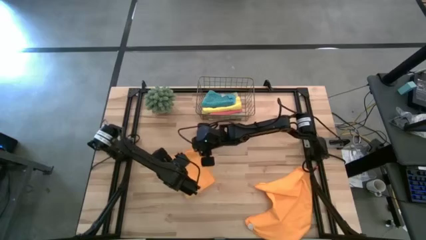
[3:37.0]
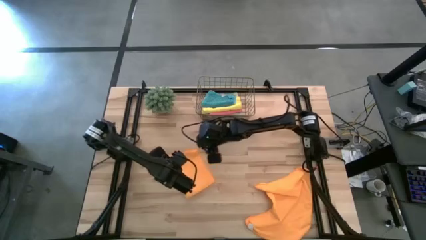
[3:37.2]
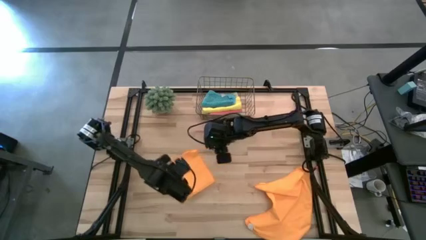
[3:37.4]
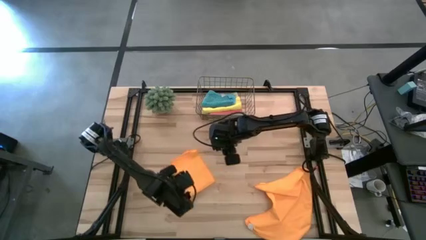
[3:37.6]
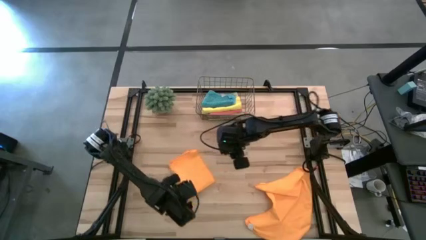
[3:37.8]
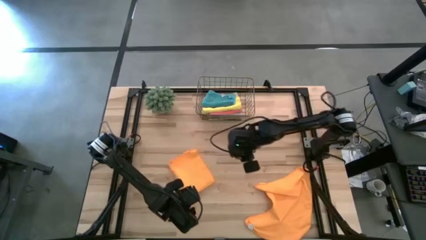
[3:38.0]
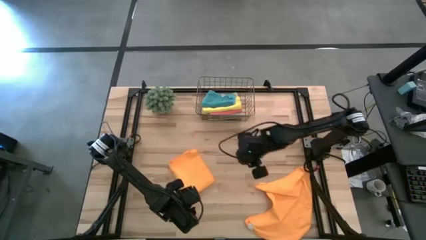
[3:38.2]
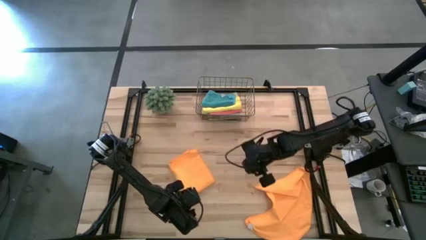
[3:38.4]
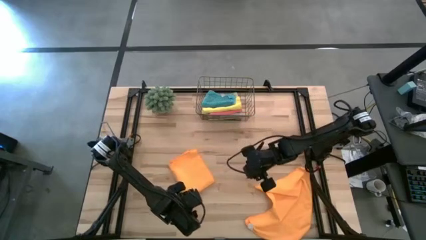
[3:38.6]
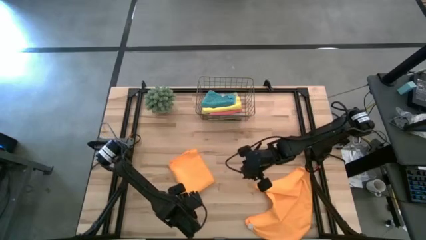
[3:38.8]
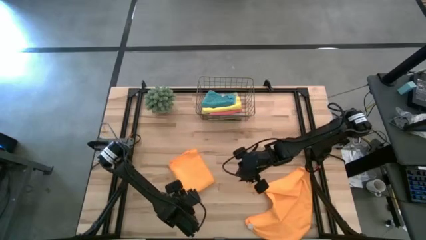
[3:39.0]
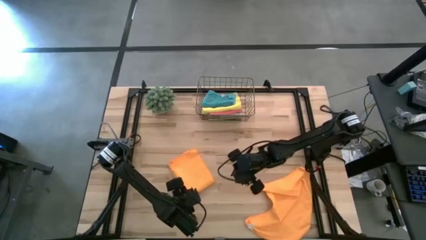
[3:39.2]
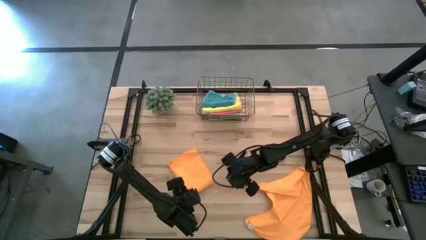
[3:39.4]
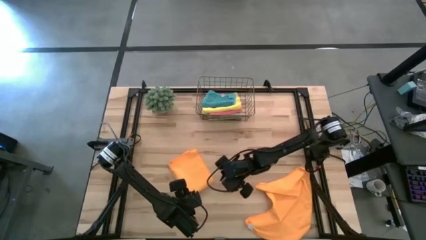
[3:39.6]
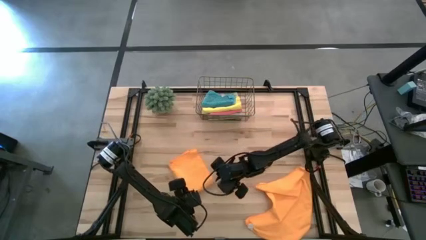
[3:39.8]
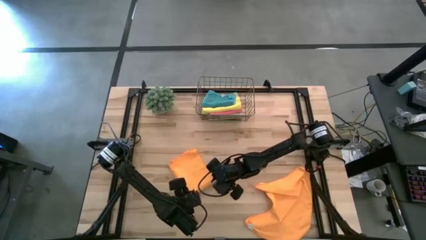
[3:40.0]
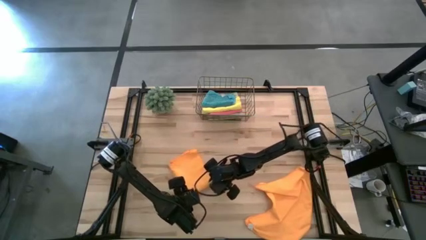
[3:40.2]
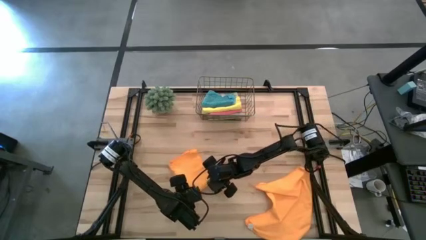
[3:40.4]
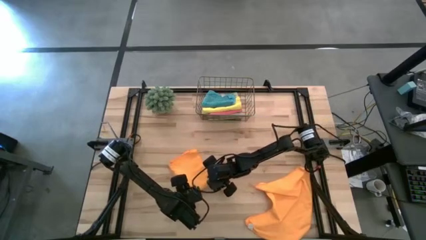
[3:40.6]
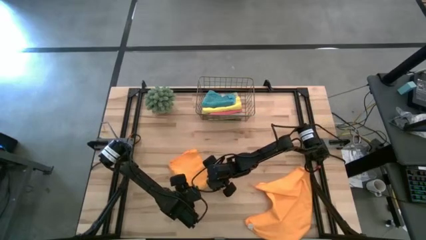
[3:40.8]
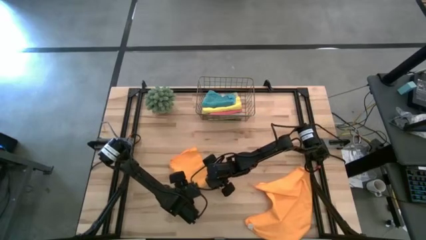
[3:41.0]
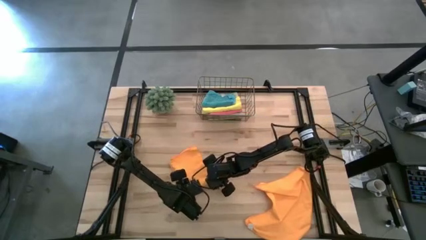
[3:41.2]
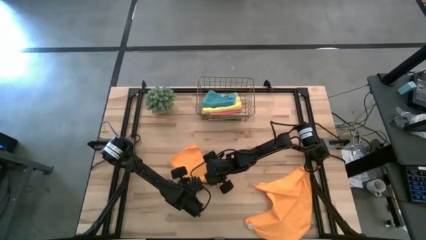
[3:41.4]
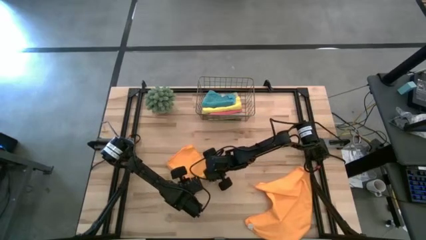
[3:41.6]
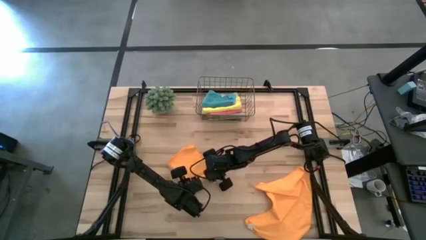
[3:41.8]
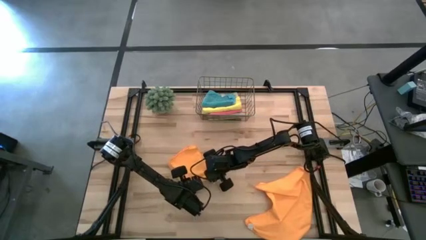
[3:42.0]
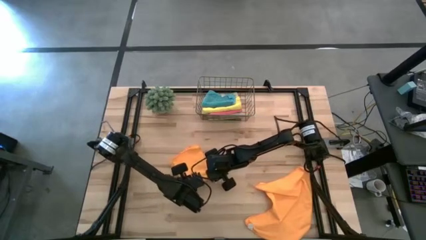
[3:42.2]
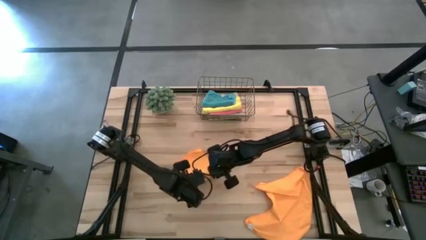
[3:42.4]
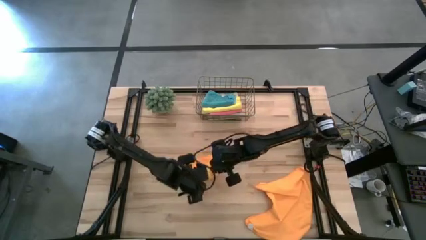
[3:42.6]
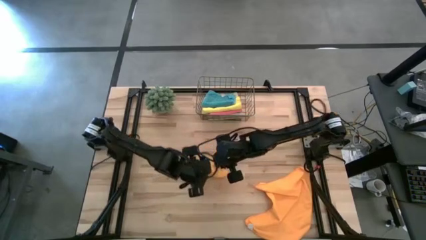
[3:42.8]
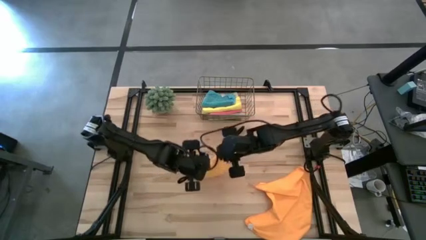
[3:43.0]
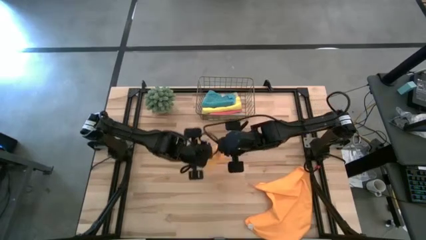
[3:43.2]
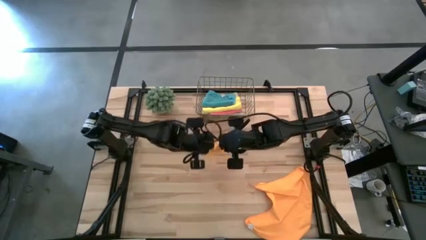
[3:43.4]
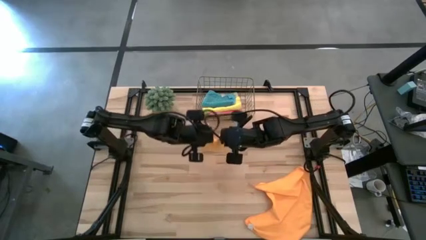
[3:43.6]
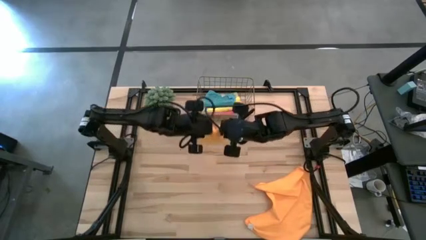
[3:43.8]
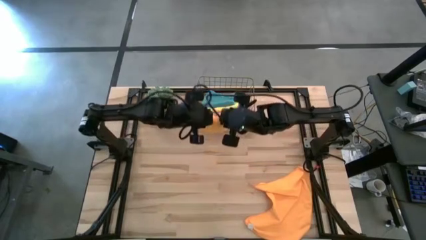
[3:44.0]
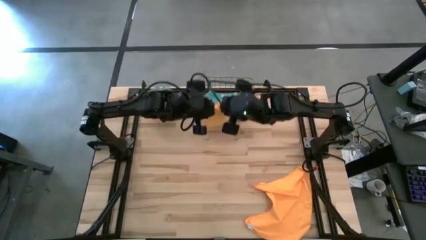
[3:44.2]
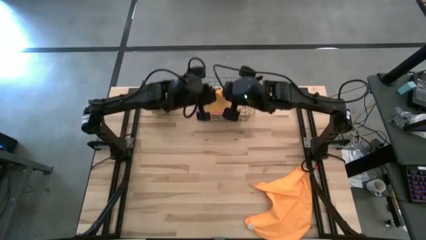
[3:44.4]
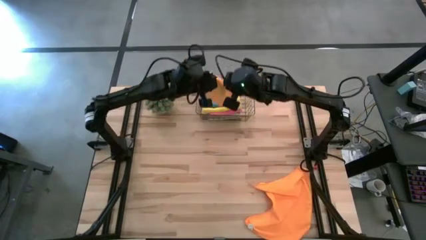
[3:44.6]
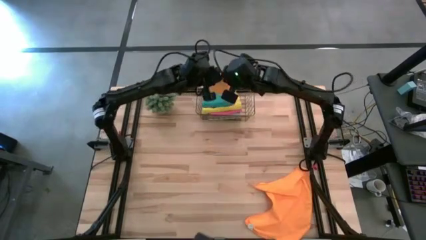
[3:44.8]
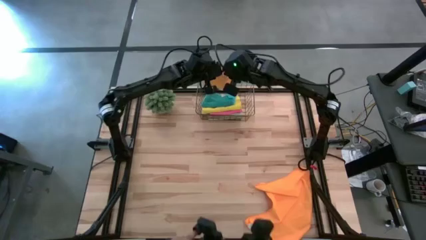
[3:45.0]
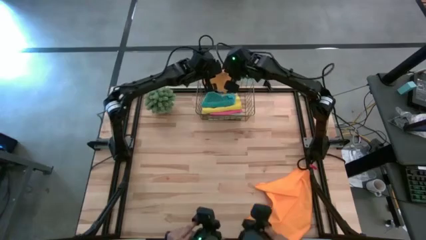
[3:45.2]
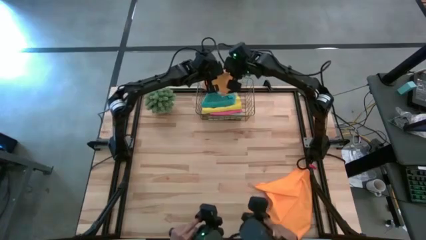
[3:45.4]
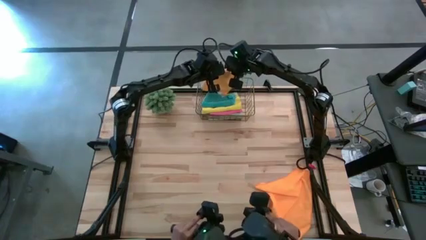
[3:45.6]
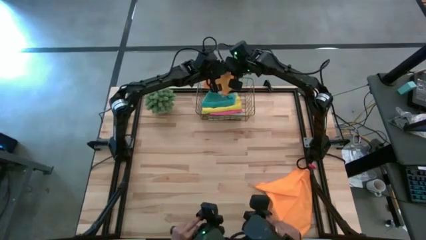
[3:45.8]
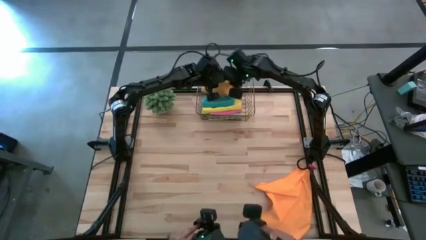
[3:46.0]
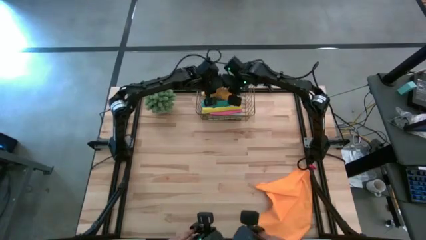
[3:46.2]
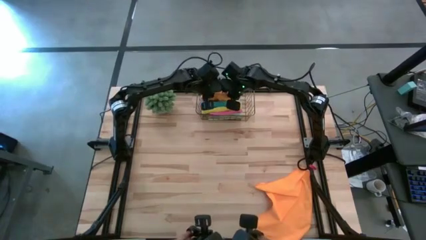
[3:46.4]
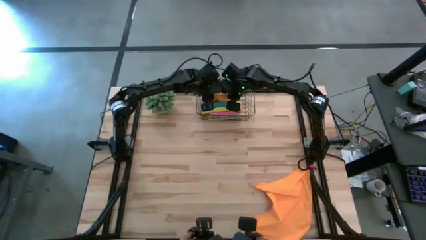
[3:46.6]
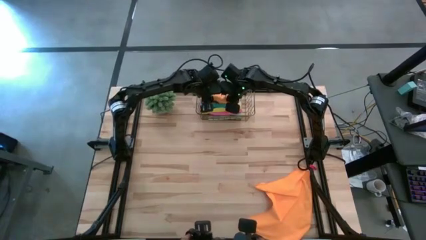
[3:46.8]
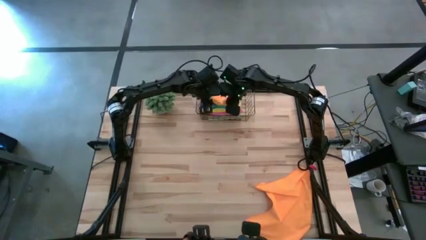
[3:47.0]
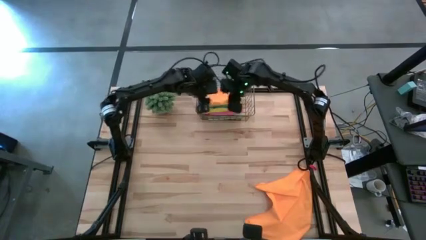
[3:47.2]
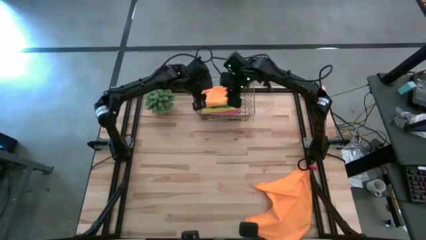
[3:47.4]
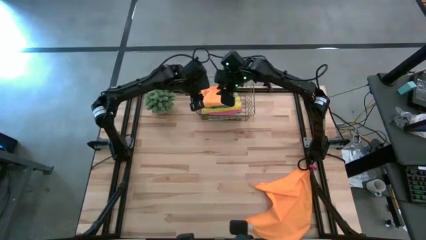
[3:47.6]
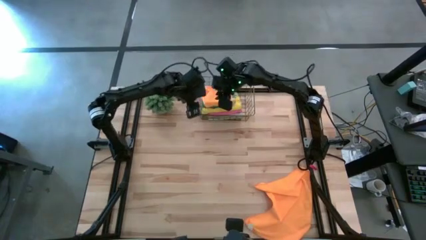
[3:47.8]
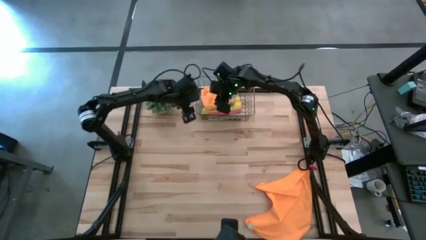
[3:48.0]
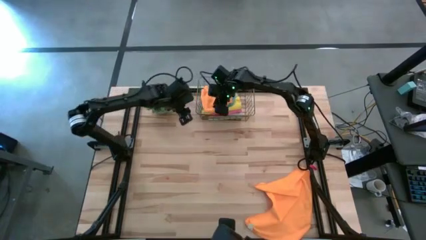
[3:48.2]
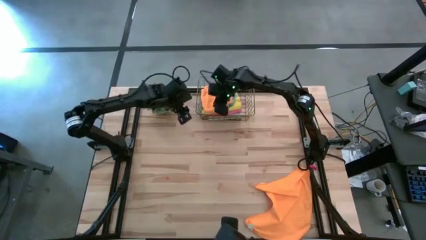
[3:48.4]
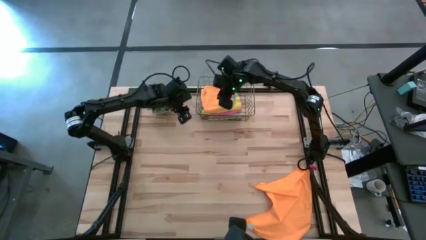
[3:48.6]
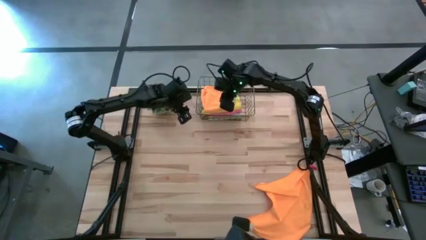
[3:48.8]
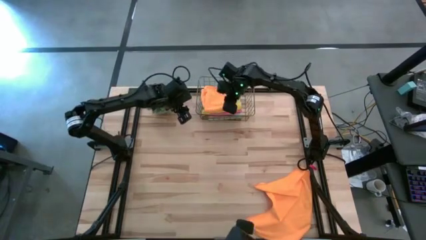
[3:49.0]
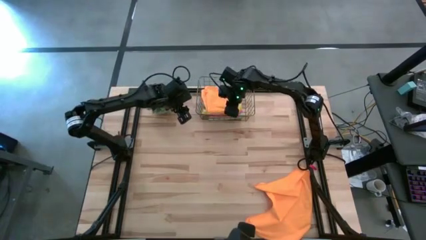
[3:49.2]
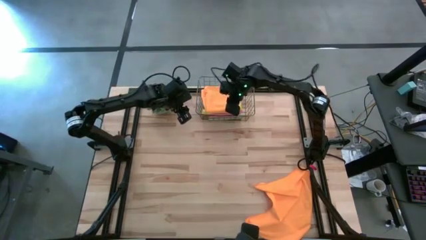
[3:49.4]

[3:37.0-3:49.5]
Task: Fold microfiber towels
Put the orange folded towel into the wire basket
